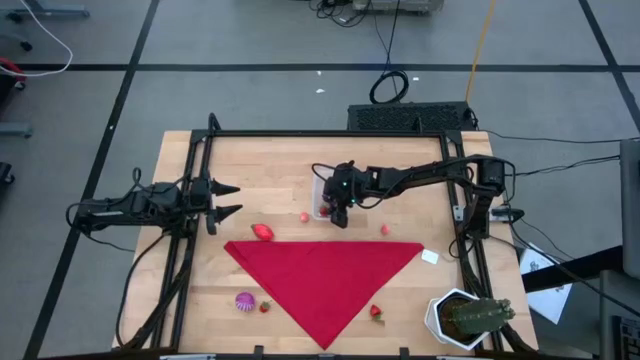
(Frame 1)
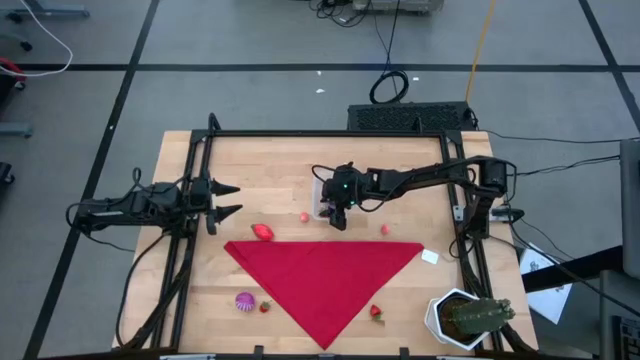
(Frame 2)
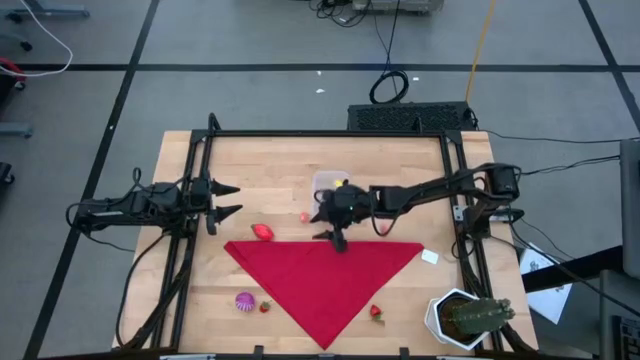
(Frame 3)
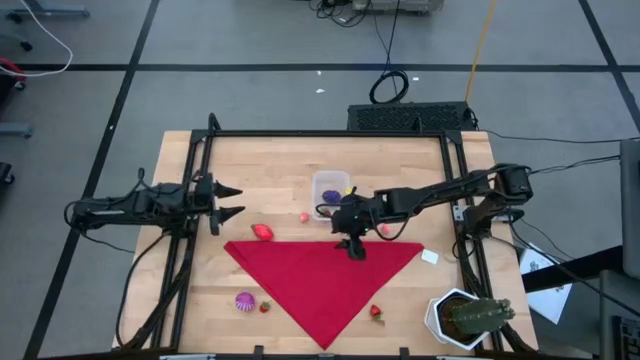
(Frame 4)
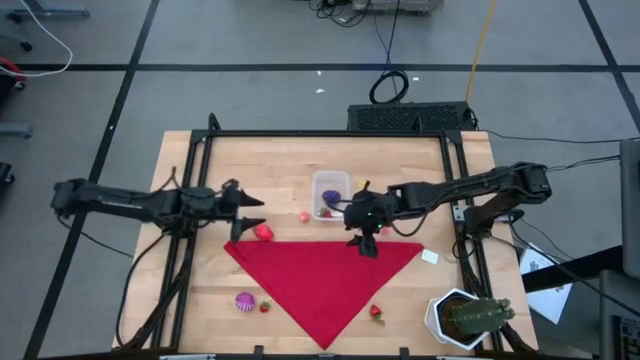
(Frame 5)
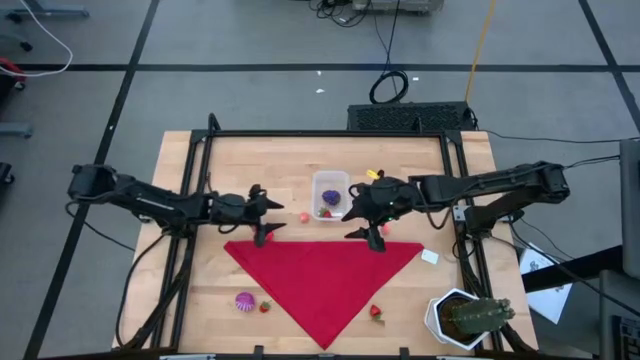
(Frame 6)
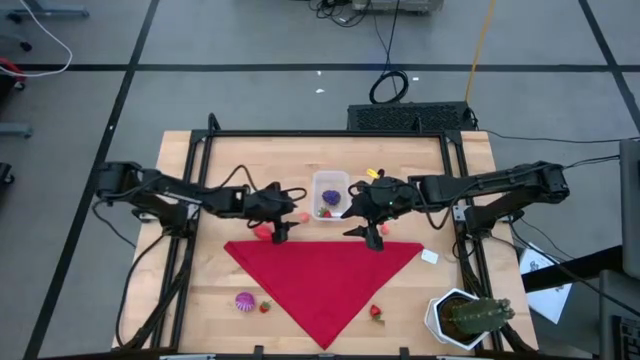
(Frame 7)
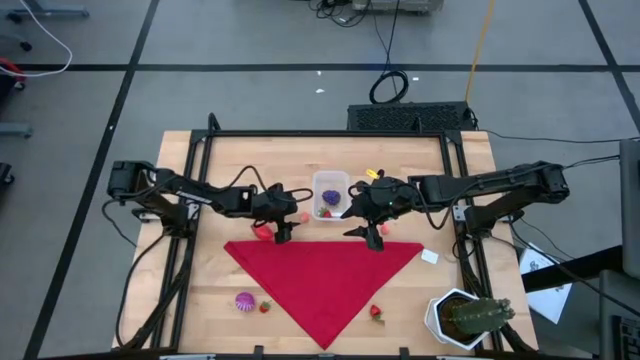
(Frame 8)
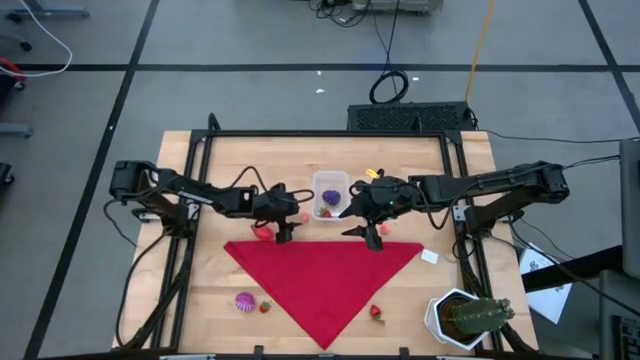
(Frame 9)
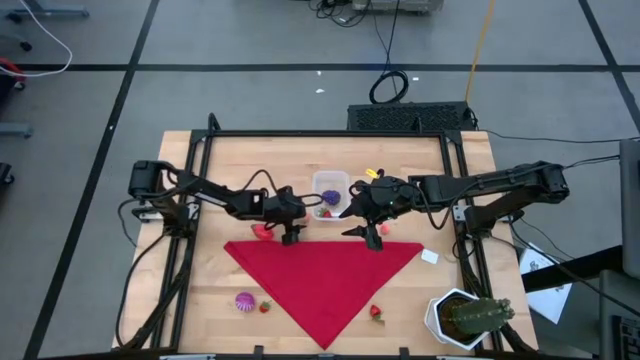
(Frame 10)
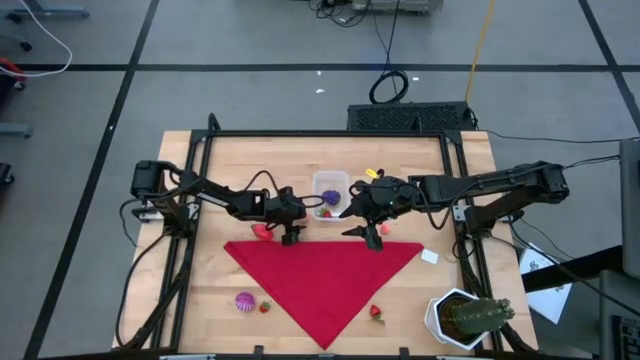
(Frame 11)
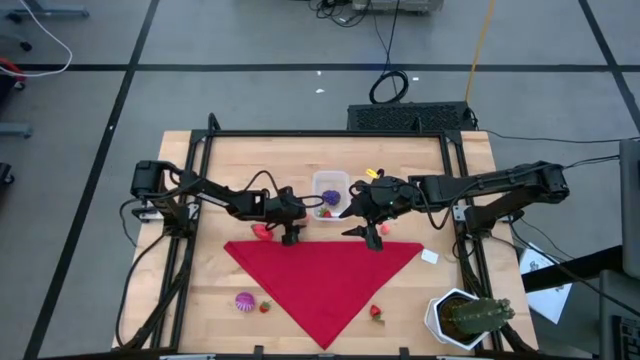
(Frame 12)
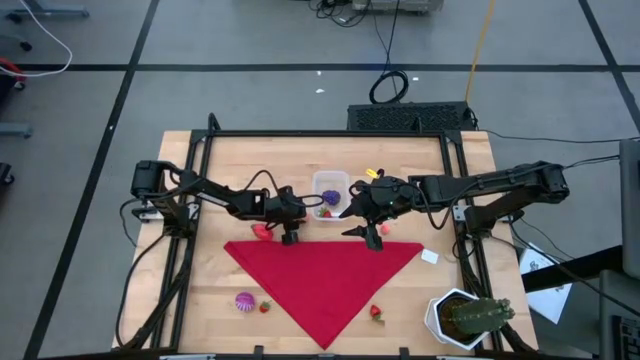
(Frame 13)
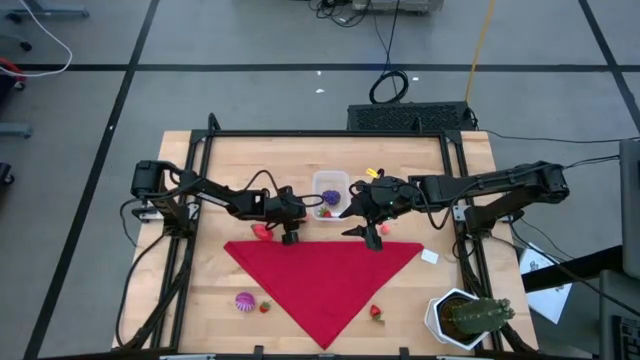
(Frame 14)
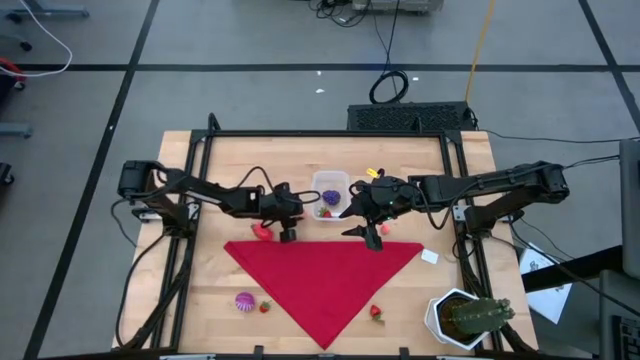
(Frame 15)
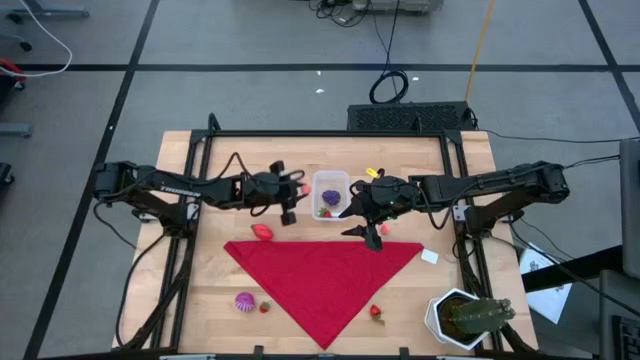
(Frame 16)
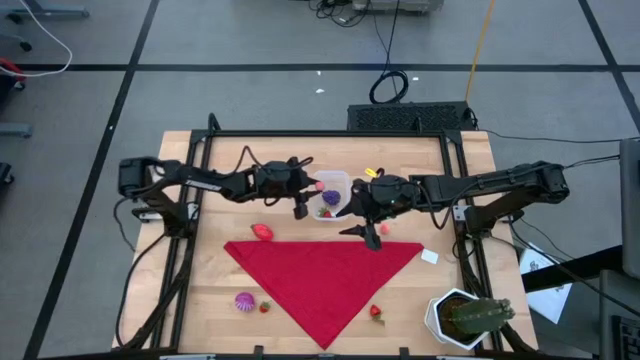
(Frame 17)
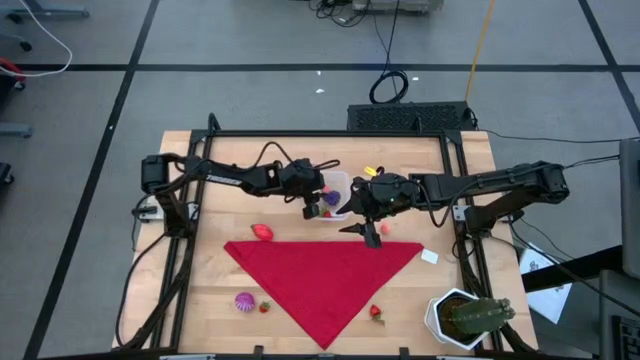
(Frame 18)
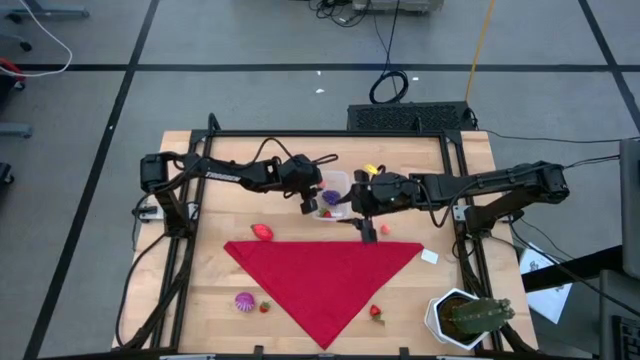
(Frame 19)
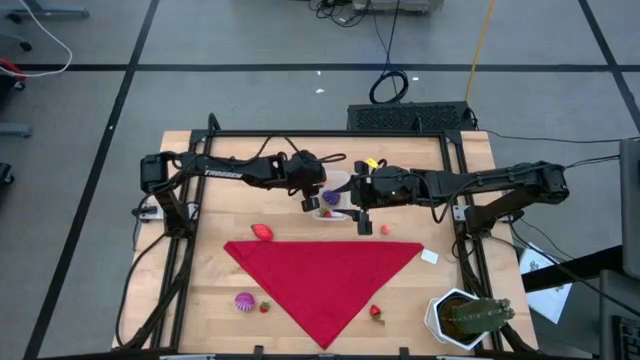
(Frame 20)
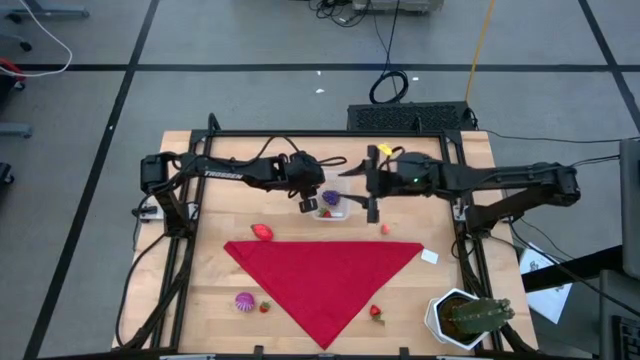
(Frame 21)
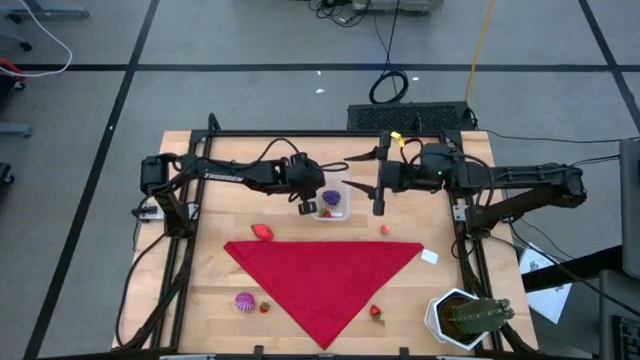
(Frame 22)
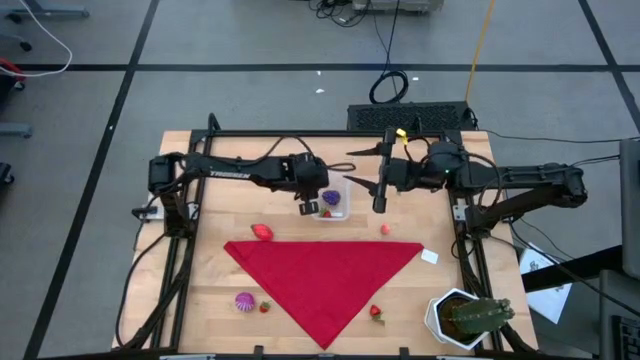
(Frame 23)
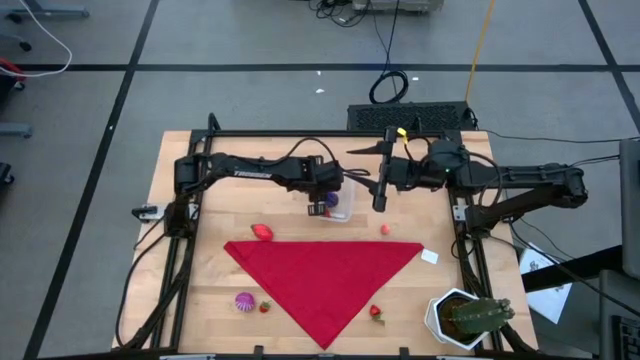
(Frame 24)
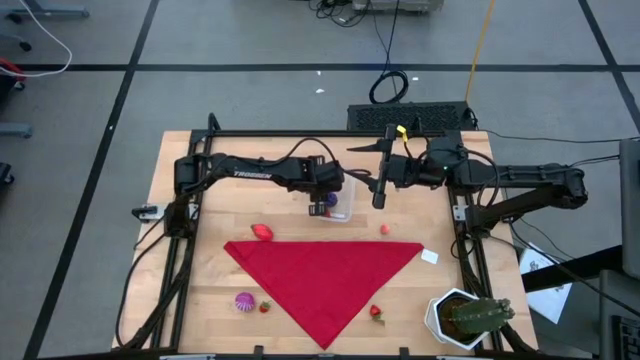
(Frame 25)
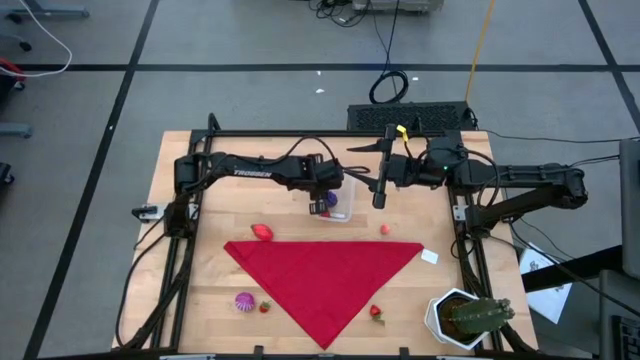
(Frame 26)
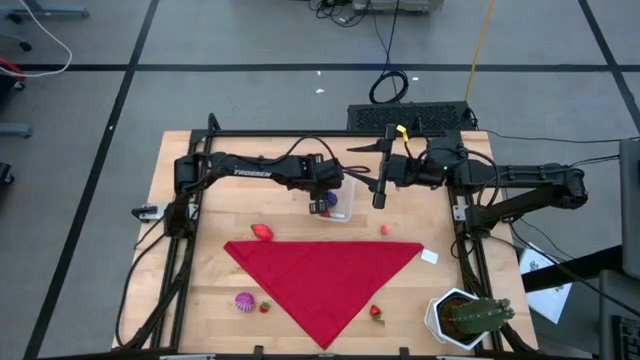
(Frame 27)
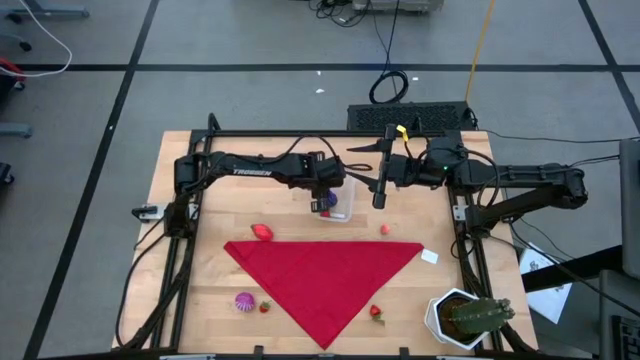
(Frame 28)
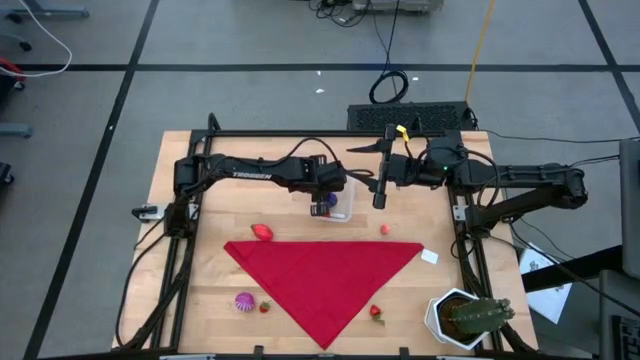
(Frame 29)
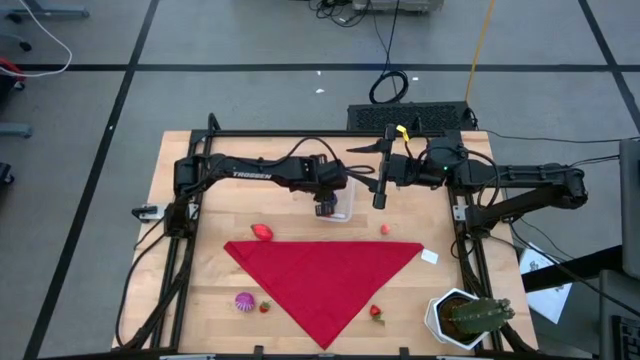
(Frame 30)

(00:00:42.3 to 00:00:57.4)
Task: Pick and placing Produce into tupperware
Put the left pink peach into the transparent bin

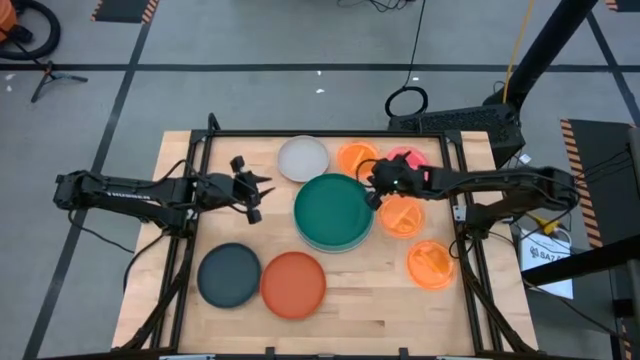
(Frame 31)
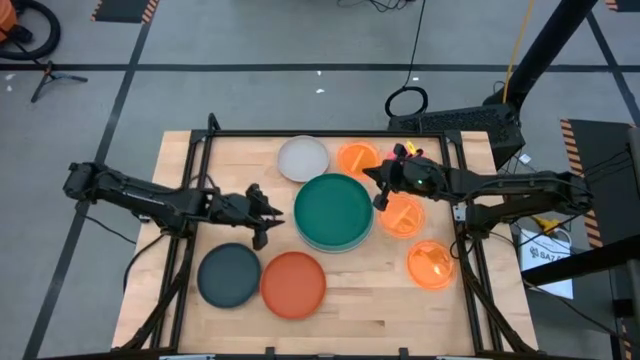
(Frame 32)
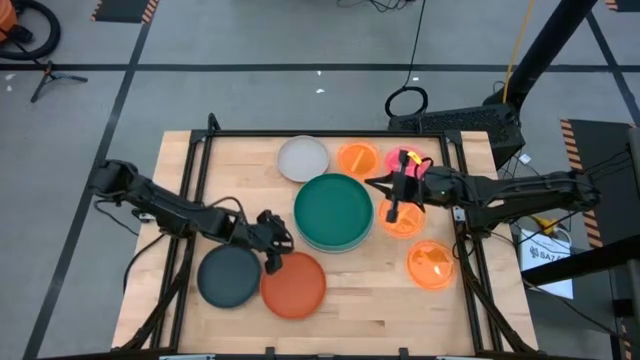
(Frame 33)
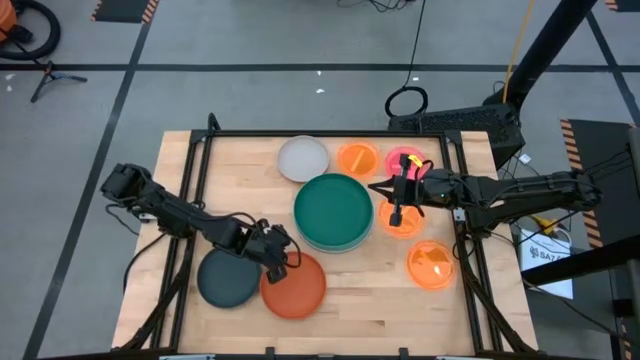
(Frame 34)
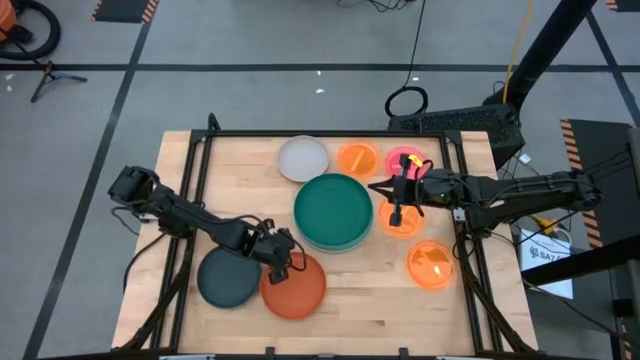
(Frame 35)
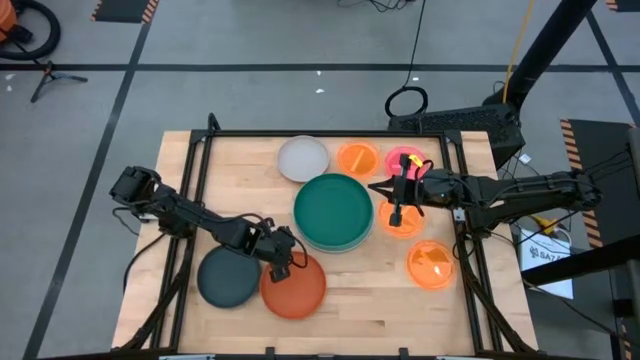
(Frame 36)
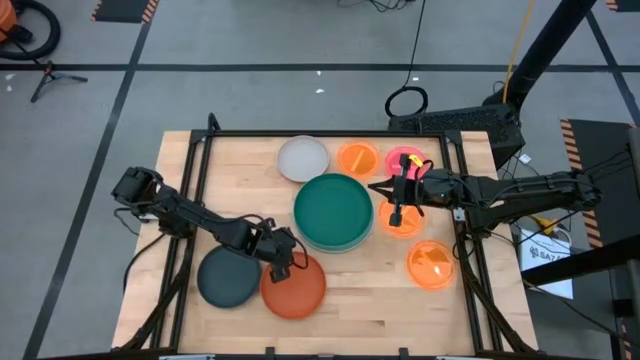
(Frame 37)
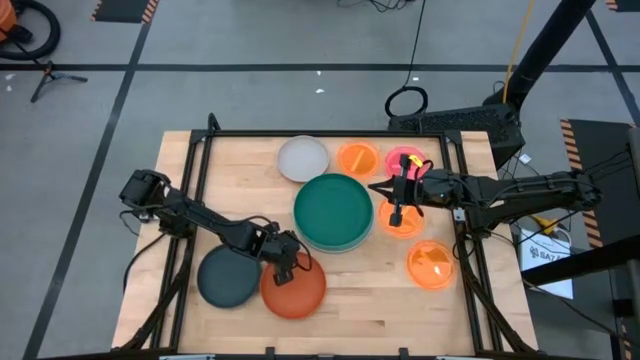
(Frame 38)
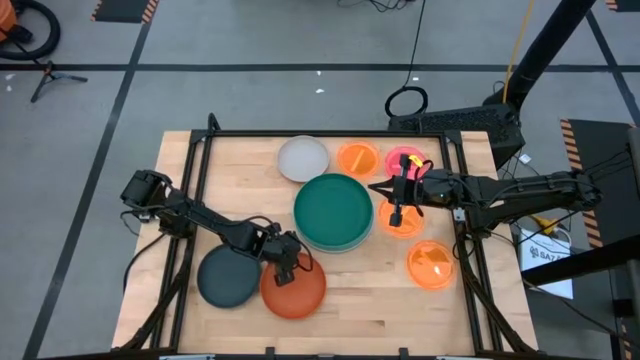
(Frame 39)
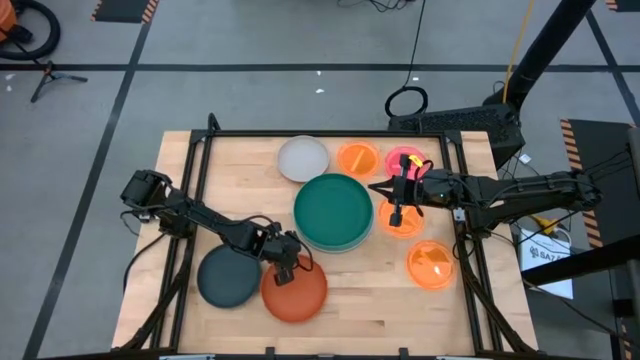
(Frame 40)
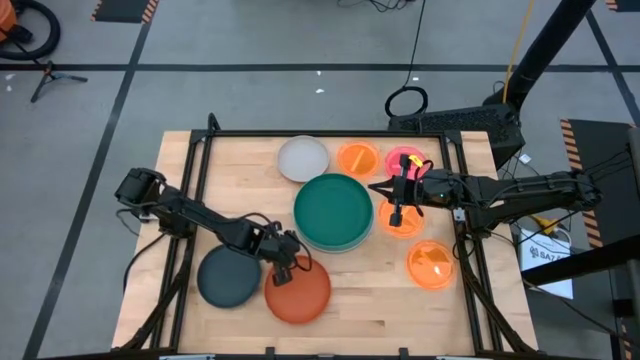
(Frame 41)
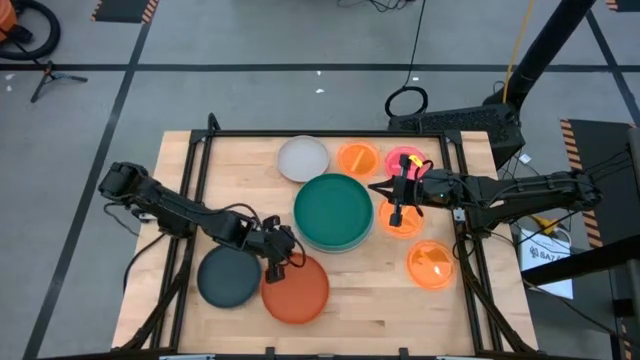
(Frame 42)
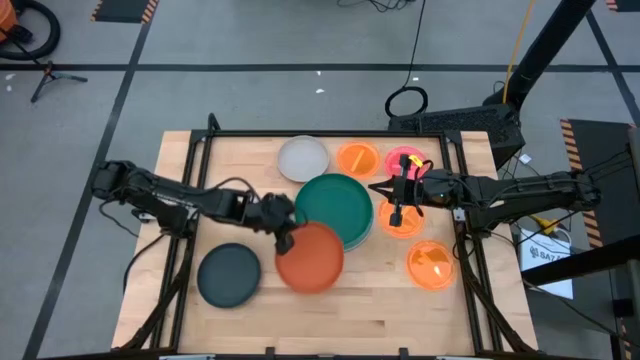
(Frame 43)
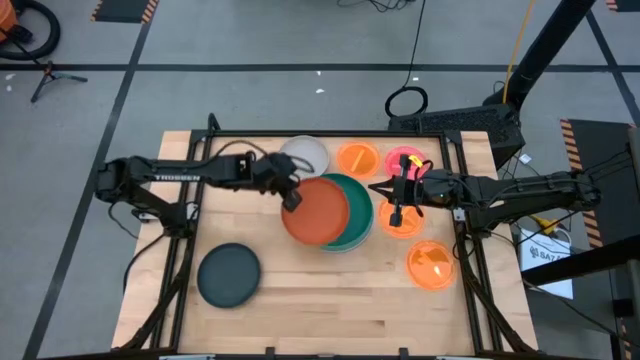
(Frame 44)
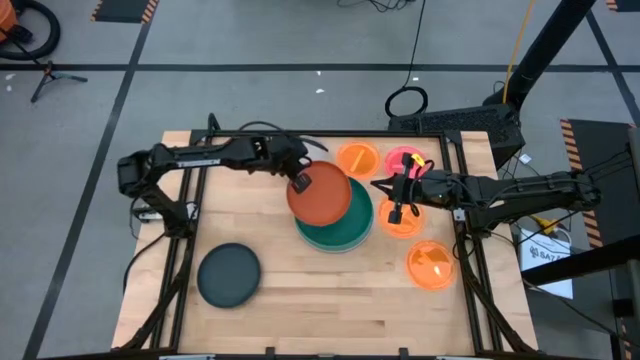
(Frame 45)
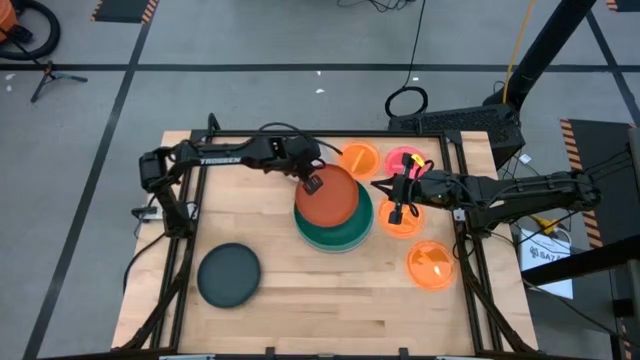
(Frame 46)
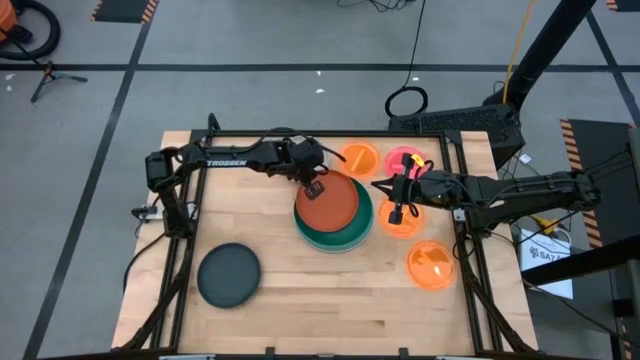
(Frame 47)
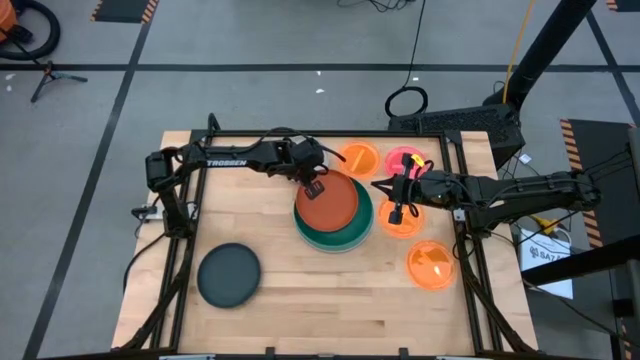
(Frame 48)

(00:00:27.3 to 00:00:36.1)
Task: Stack plastic plates
Stack the orange plate on top of the green plate
